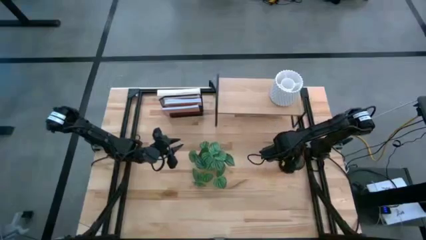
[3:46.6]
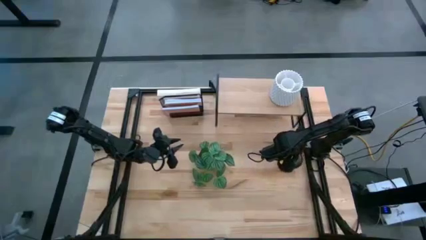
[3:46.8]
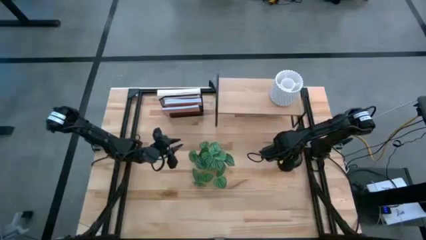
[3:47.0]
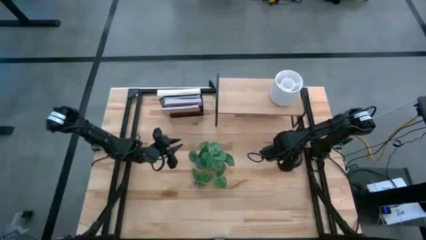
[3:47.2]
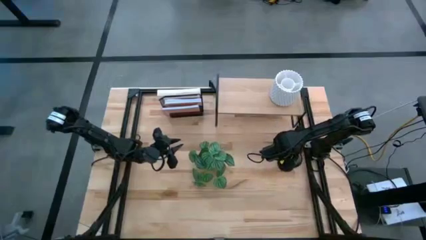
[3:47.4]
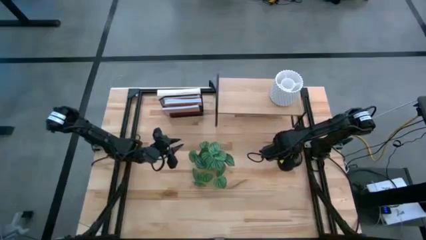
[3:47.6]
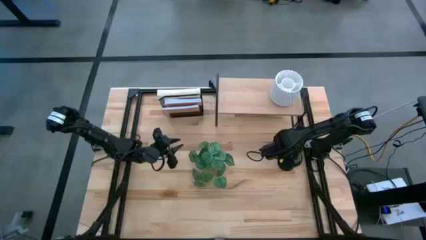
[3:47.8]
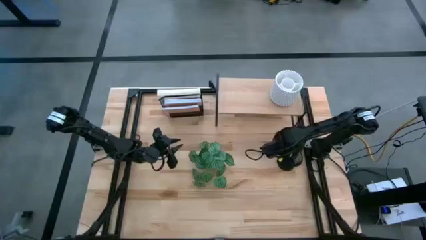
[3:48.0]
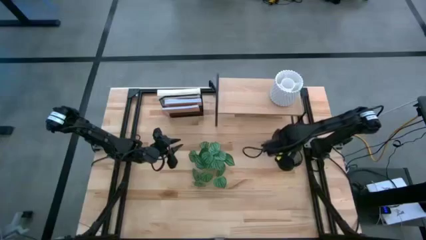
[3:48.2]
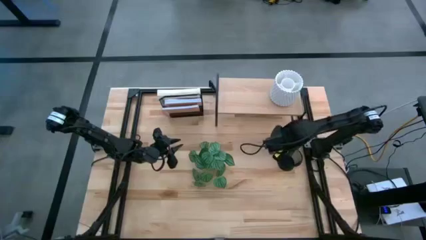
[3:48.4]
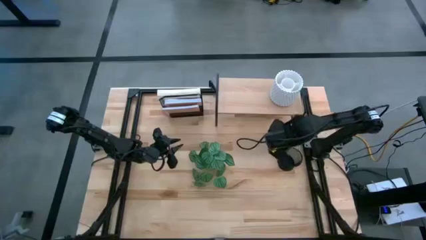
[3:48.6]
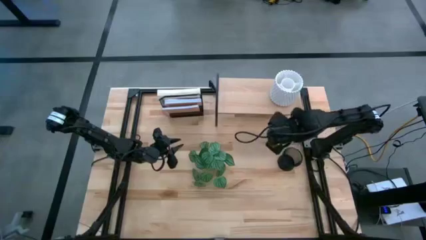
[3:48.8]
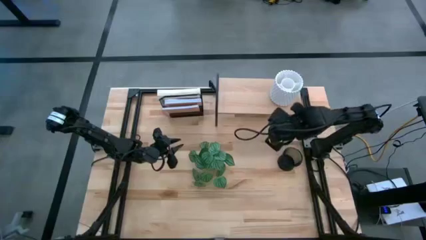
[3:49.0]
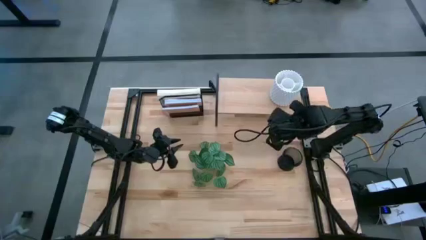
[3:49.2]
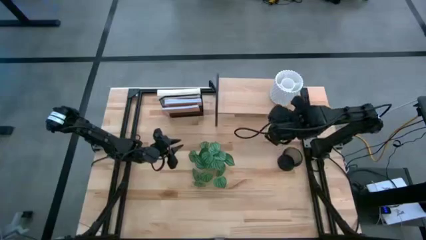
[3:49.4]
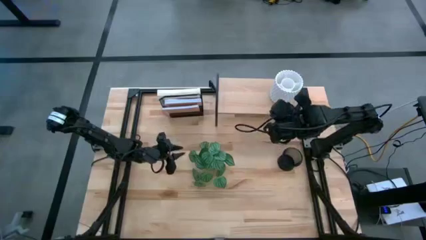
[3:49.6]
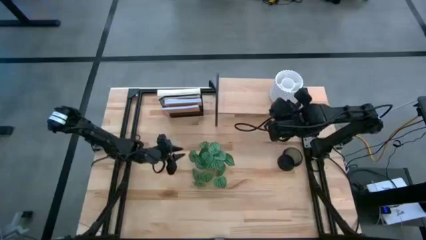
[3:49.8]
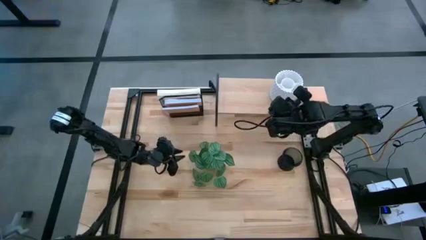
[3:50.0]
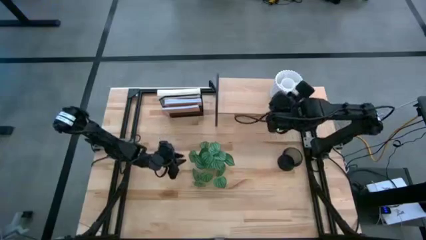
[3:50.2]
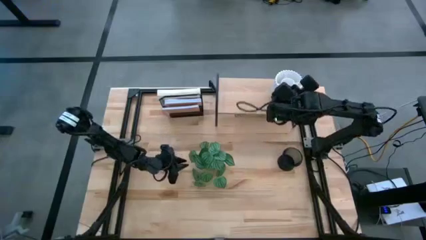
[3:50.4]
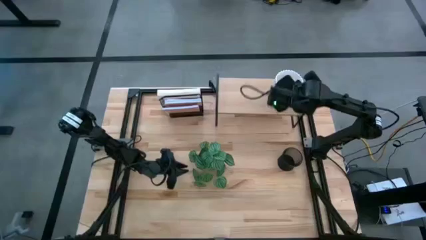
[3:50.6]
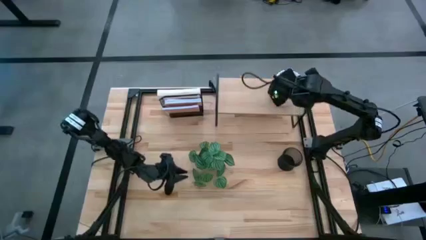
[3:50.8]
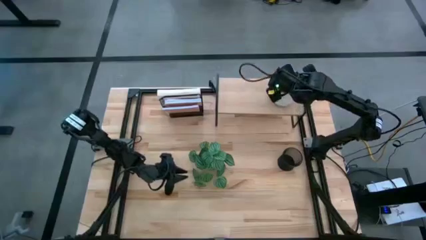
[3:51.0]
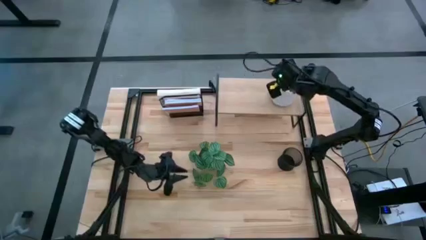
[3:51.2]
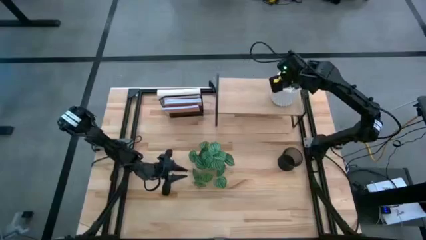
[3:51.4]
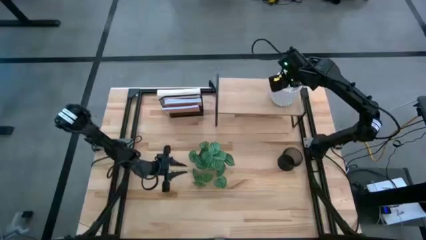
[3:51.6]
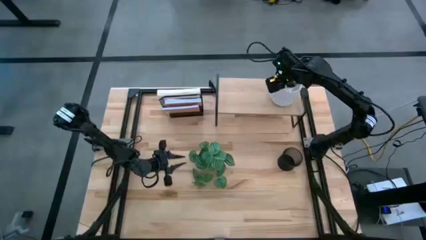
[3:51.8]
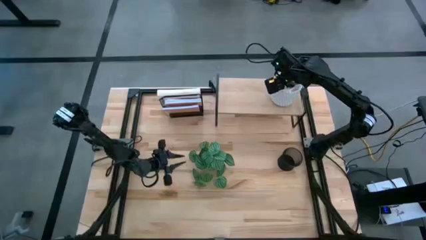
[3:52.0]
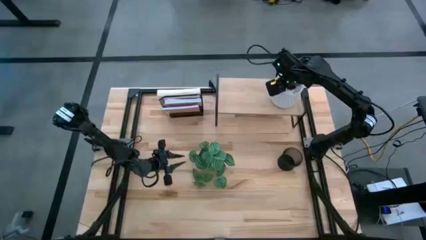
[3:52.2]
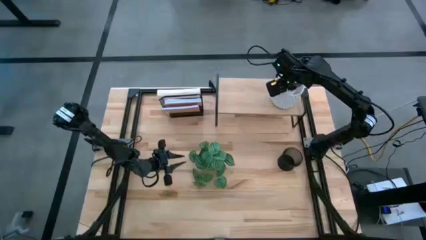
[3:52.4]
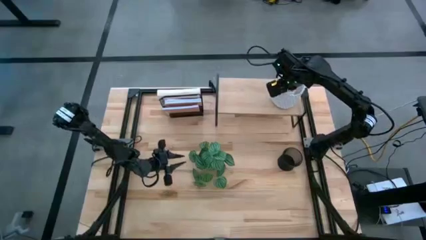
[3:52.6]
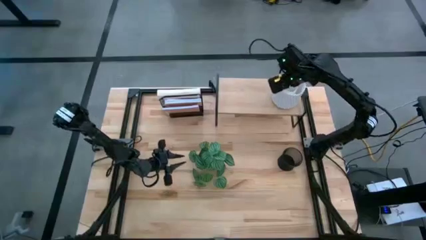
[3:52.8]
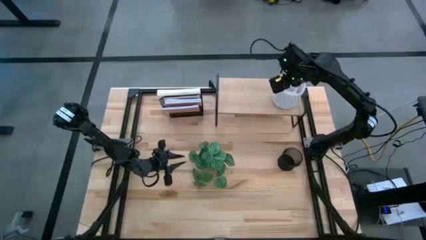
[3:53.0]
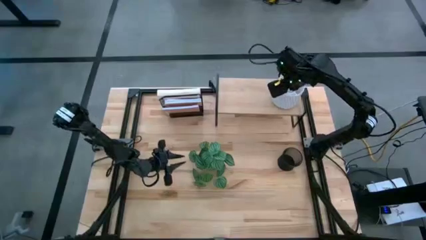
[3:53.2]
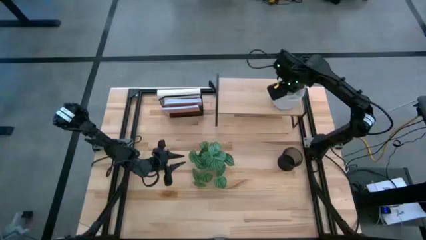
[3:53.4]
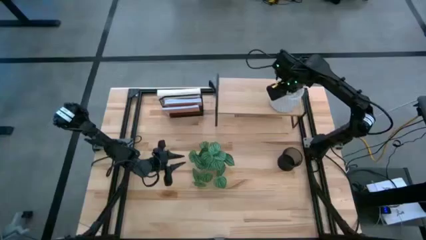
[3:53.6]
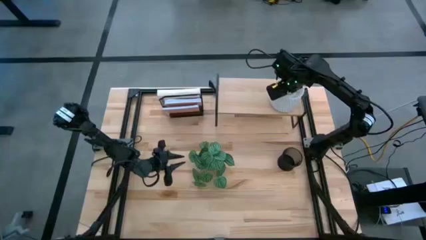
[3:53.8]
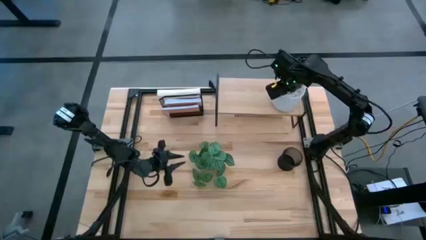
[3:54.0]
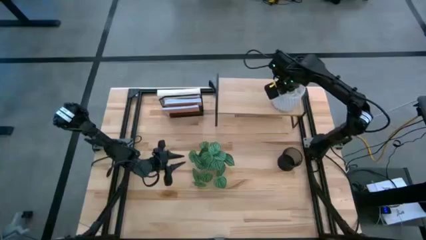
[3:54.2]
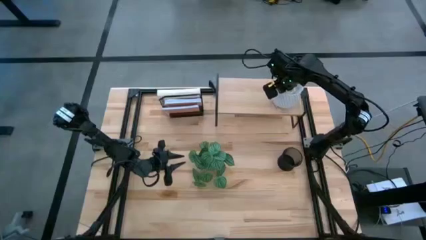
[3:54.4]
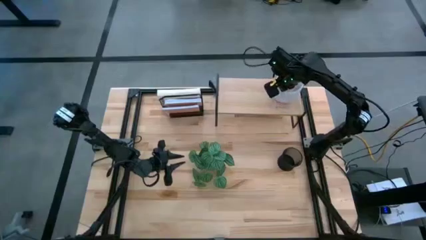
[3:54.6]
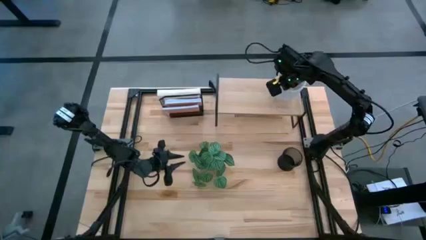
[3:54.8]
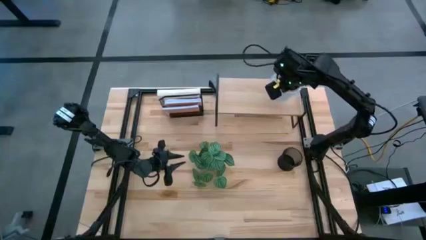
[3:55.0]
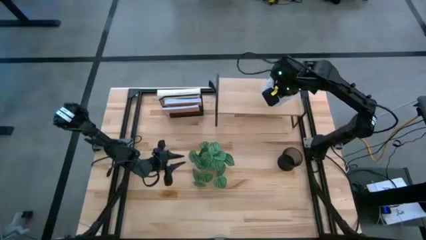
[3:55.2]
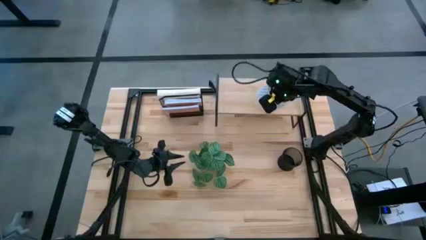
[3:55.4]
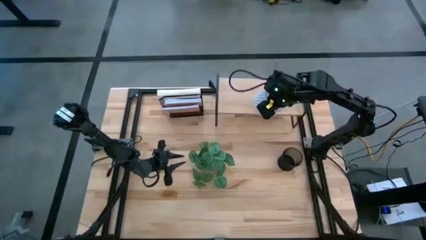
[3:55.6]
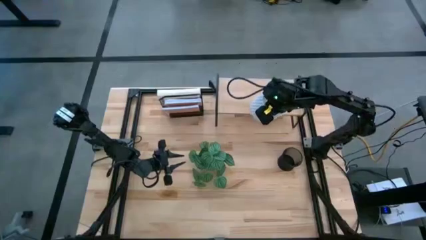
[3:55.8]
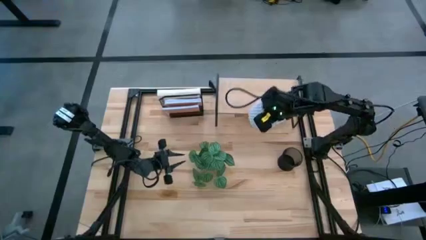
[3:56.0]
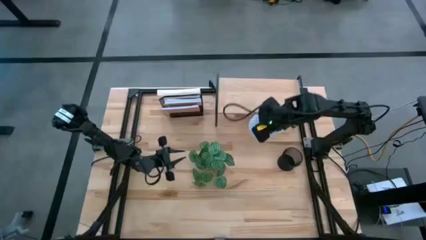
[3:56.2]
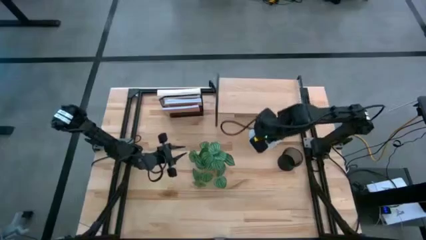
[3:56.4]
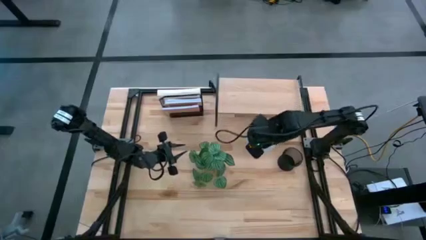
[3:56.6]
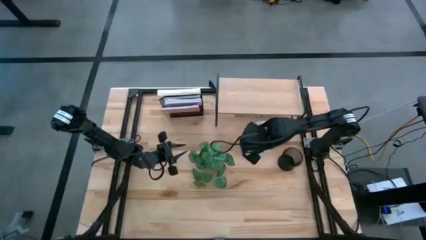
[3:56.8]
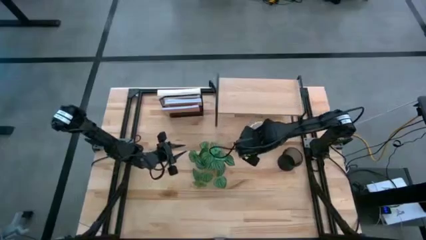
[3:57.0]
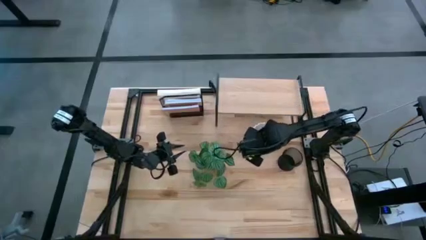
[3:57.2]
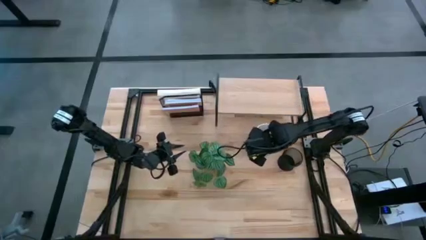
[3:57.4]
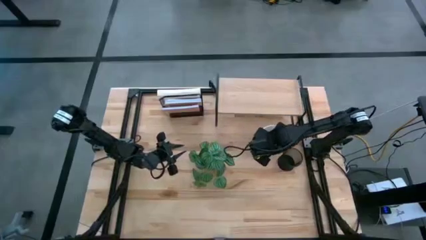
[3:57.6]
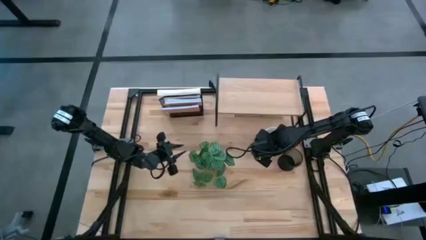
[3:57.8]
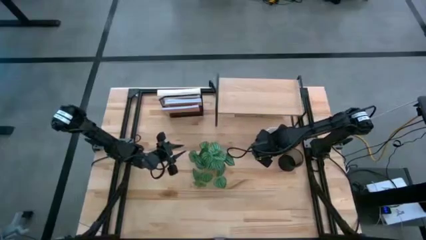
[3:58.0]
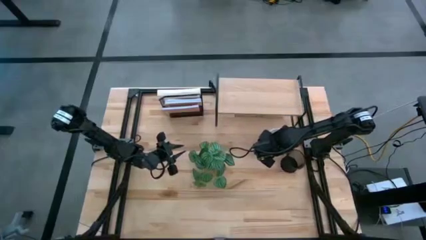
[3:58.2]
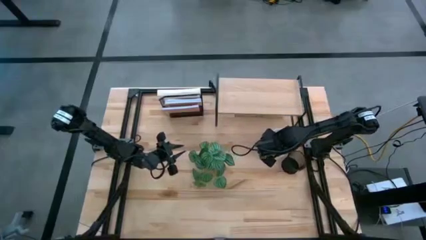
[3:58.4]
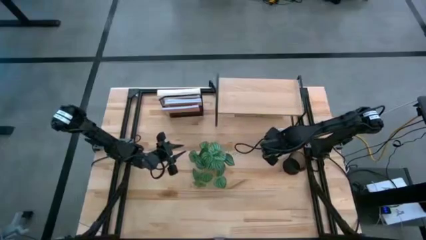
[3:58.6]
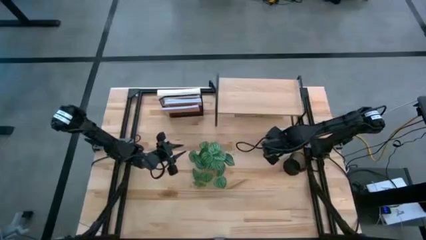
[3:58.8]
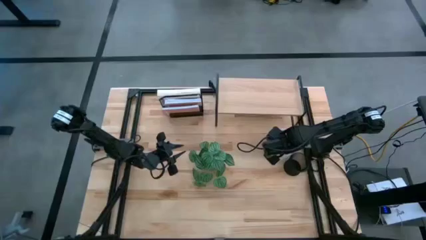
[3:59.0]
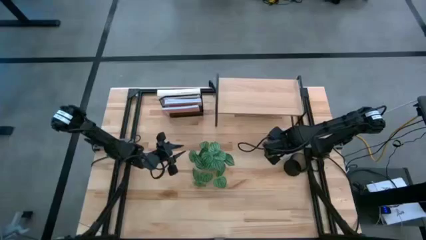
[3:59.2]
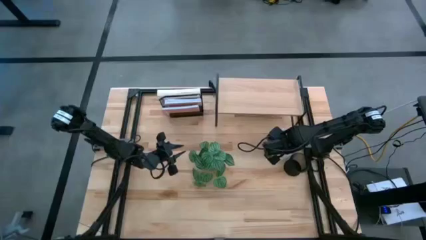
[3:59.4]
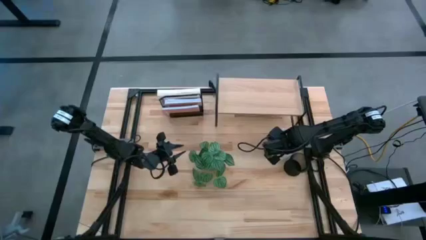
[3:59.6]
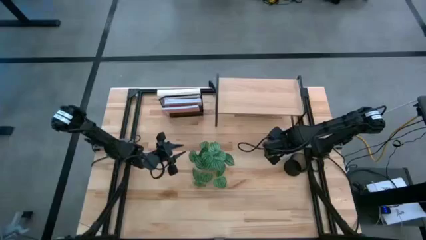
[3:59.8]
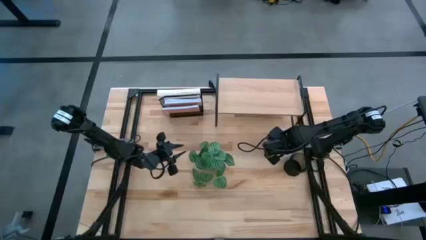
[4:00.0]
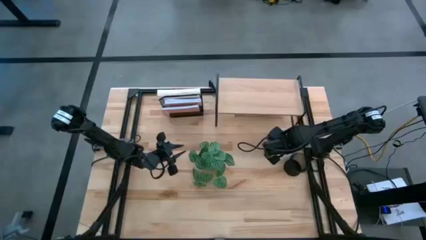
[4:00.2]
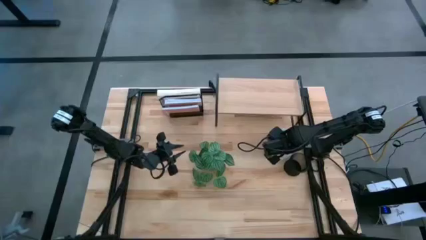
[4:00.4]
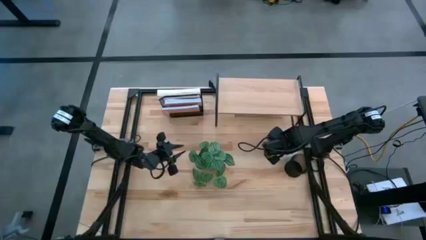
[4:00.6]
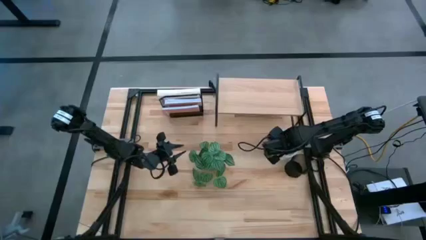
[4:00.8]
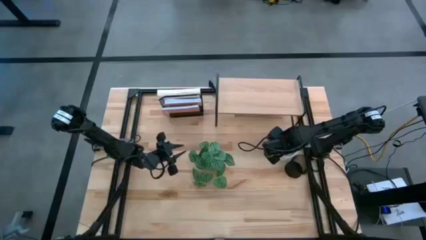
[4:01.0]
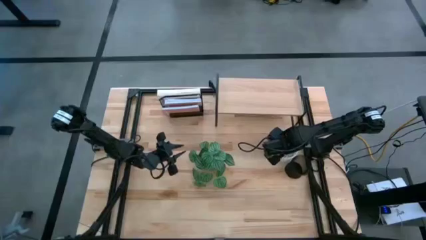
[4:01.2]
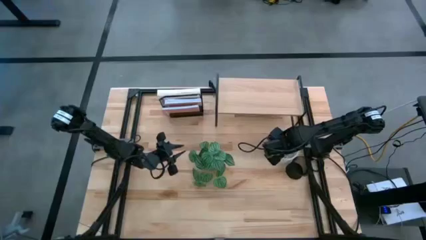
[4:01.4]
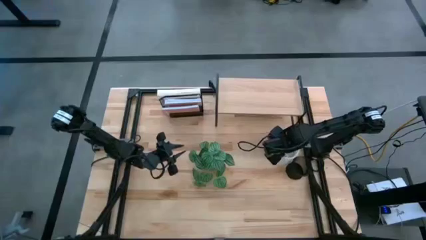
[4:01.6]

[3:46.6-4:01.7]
Task: Stock shelves
Remove the white pen organizer from the shelf
